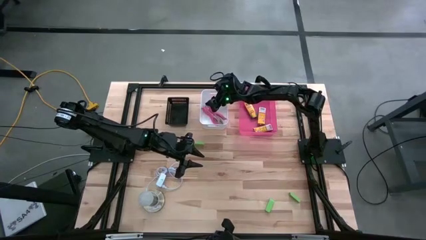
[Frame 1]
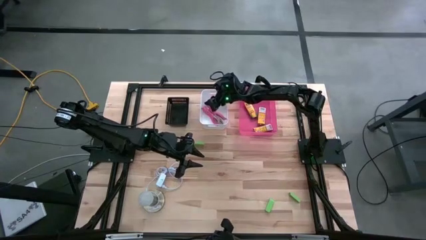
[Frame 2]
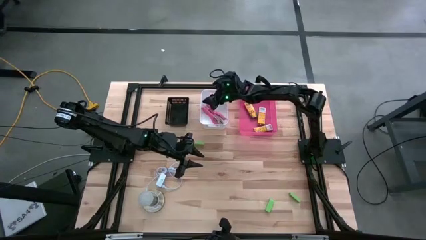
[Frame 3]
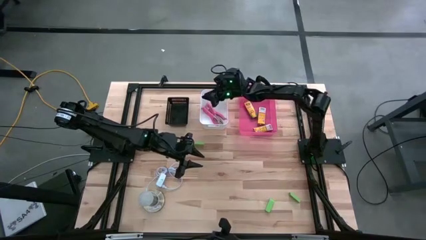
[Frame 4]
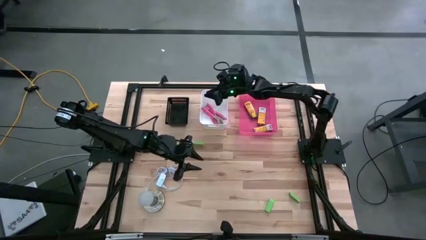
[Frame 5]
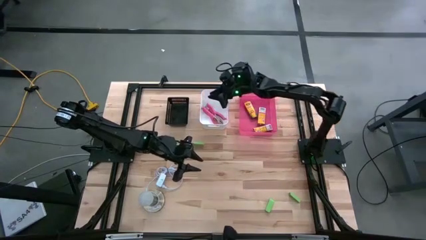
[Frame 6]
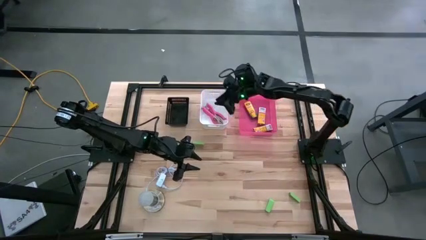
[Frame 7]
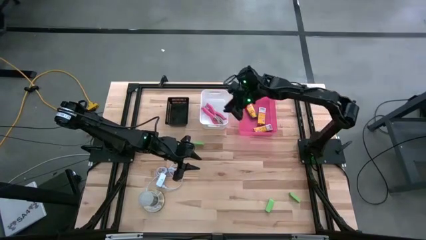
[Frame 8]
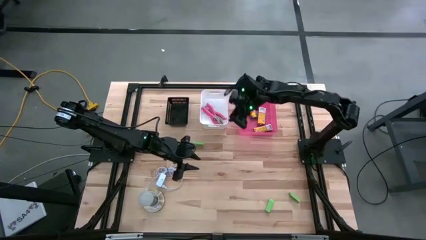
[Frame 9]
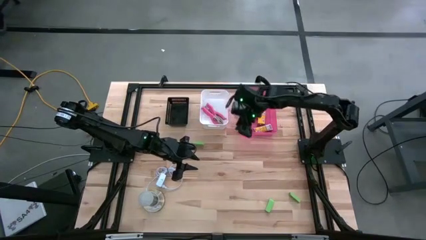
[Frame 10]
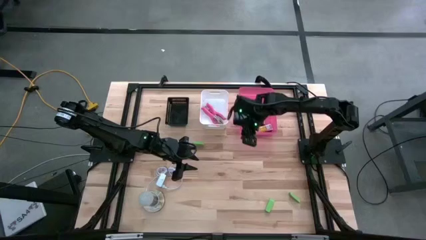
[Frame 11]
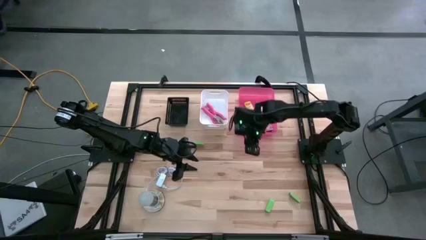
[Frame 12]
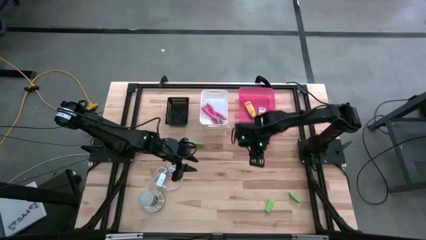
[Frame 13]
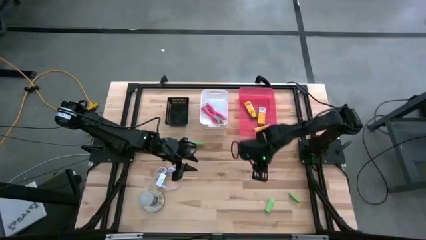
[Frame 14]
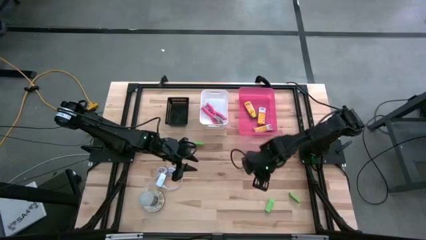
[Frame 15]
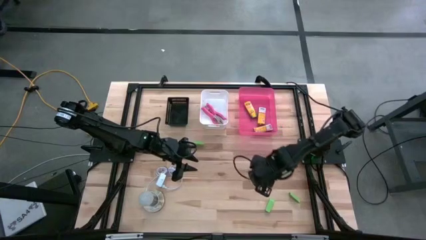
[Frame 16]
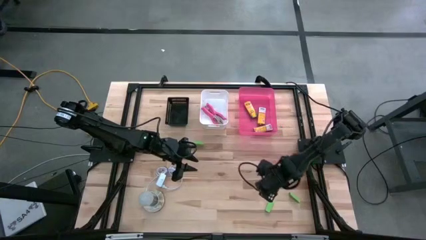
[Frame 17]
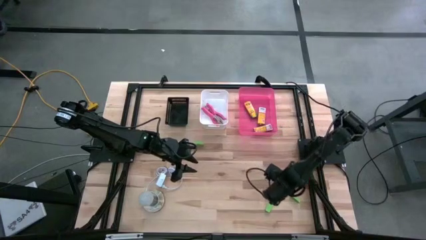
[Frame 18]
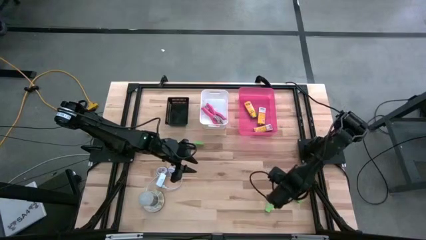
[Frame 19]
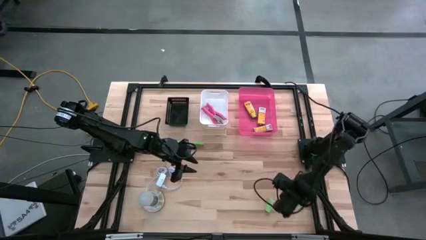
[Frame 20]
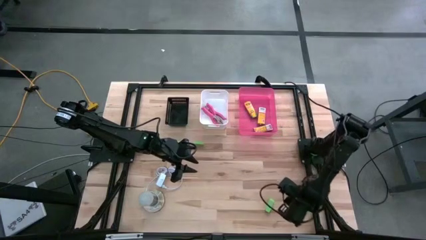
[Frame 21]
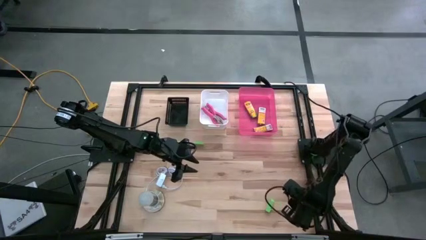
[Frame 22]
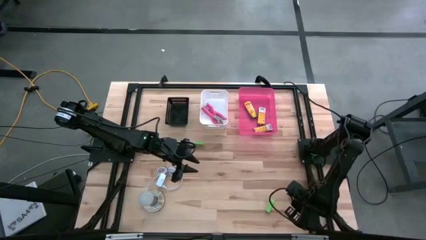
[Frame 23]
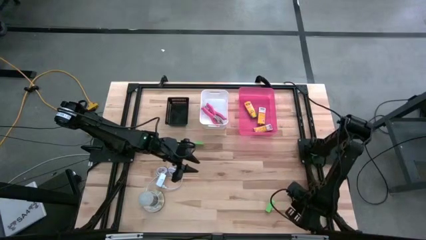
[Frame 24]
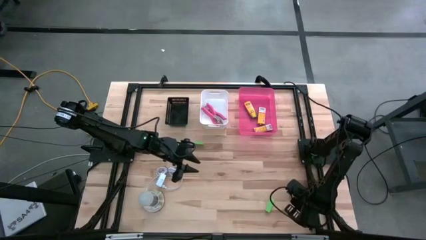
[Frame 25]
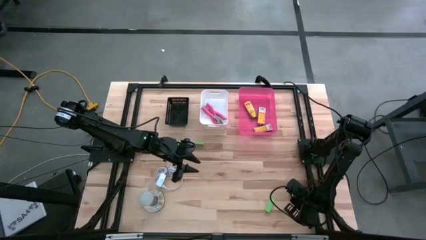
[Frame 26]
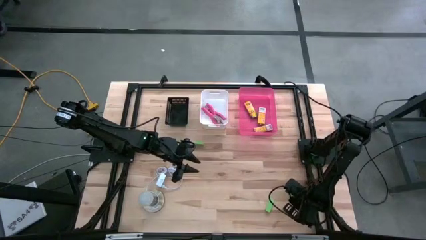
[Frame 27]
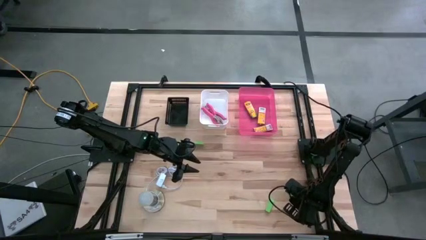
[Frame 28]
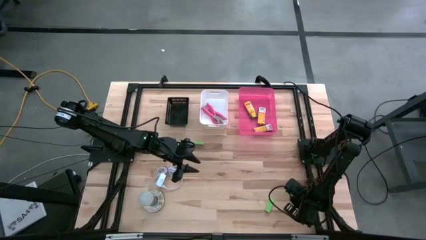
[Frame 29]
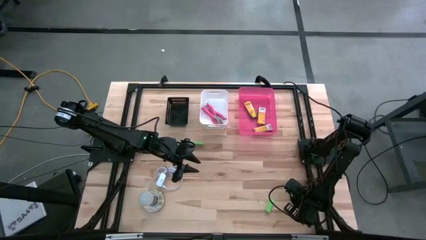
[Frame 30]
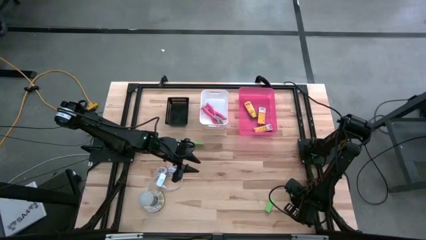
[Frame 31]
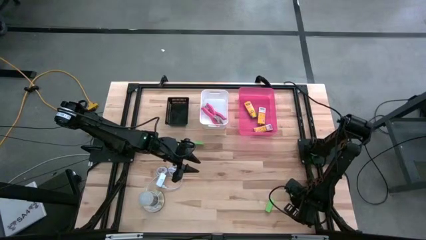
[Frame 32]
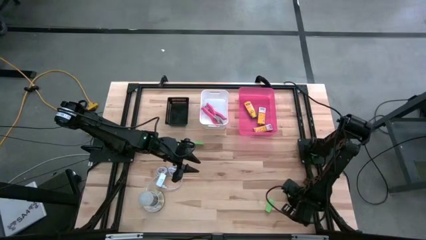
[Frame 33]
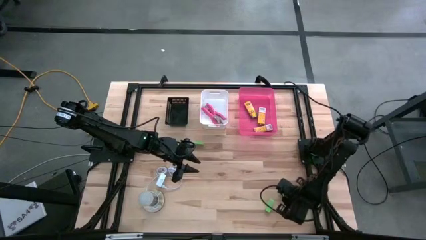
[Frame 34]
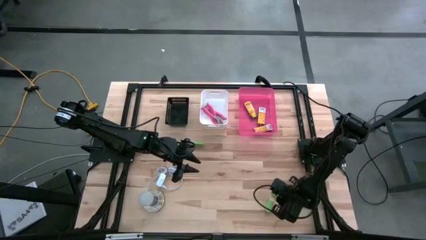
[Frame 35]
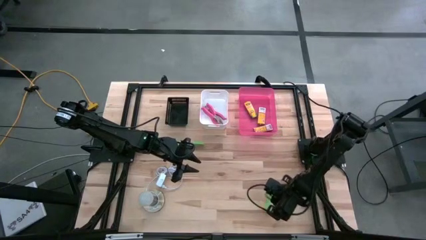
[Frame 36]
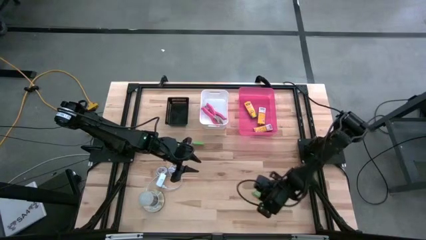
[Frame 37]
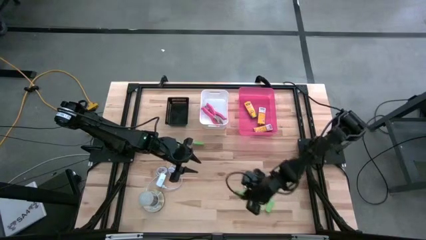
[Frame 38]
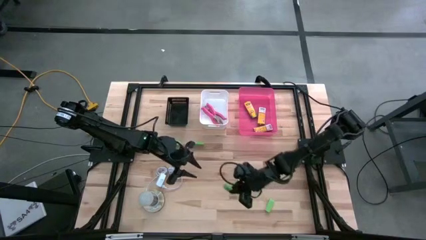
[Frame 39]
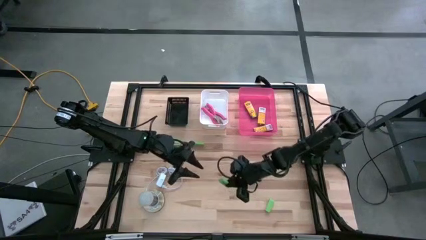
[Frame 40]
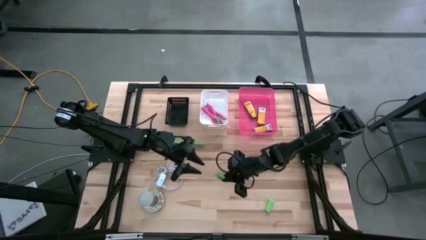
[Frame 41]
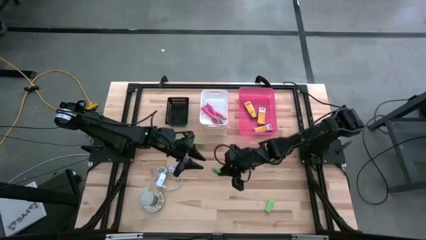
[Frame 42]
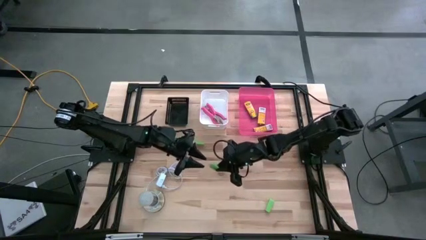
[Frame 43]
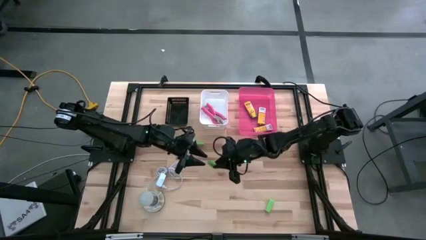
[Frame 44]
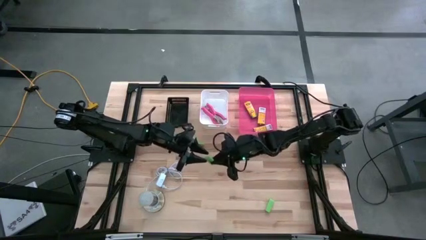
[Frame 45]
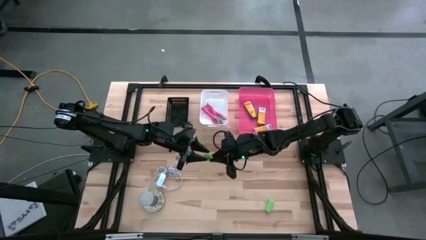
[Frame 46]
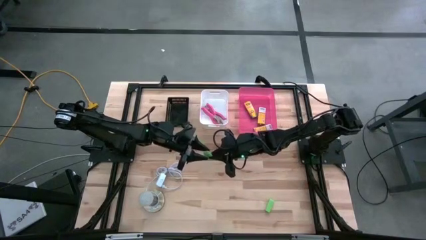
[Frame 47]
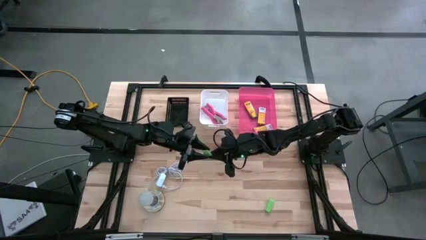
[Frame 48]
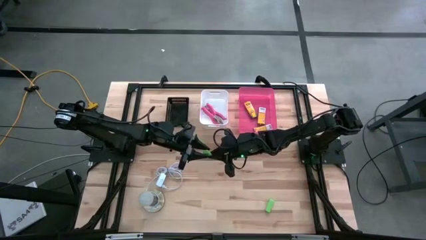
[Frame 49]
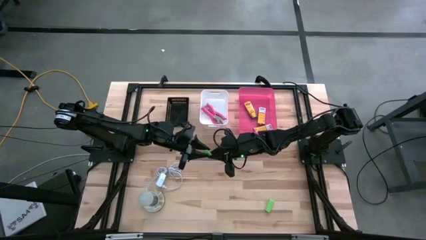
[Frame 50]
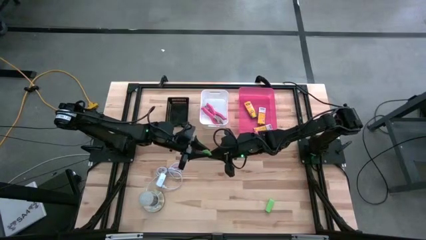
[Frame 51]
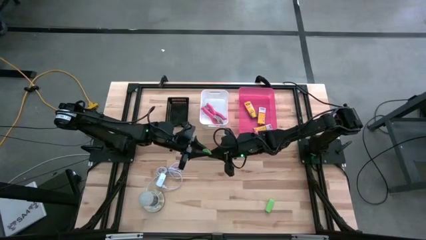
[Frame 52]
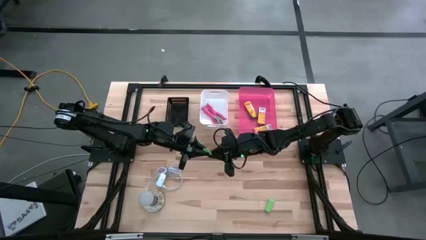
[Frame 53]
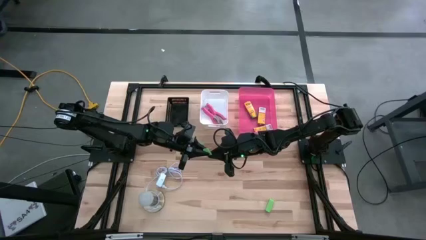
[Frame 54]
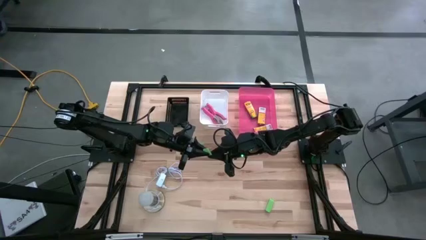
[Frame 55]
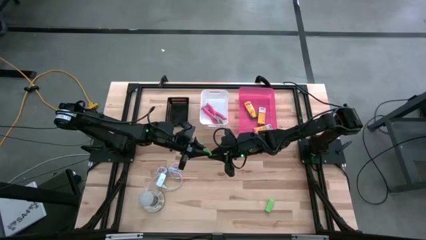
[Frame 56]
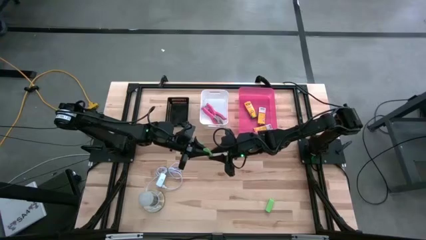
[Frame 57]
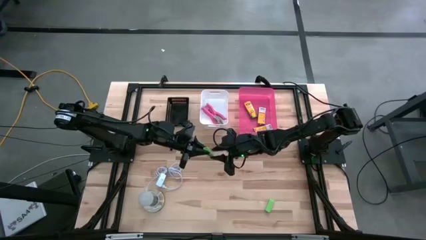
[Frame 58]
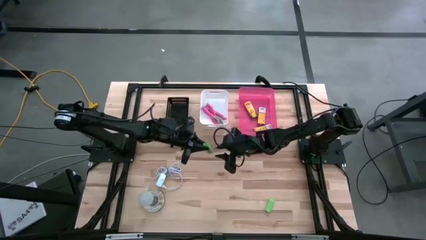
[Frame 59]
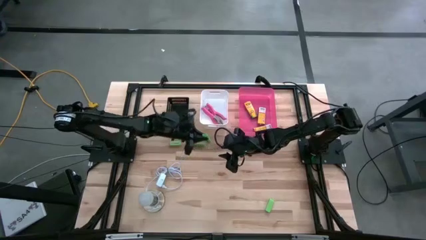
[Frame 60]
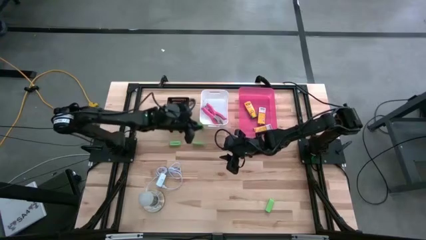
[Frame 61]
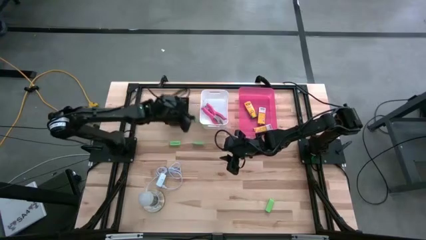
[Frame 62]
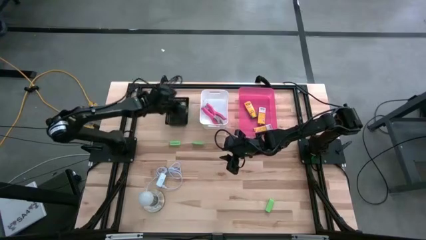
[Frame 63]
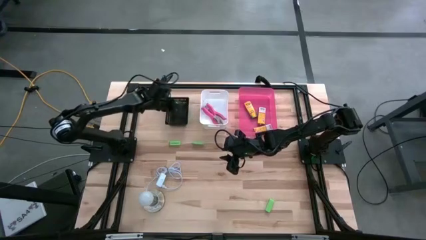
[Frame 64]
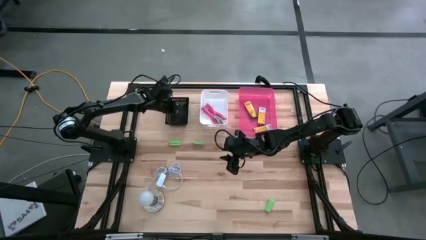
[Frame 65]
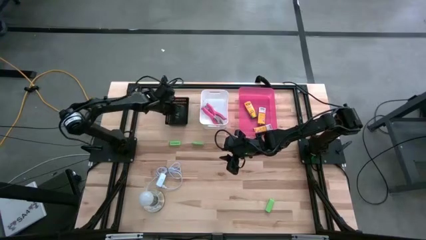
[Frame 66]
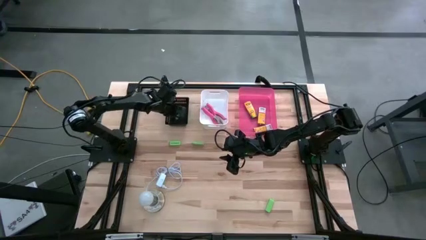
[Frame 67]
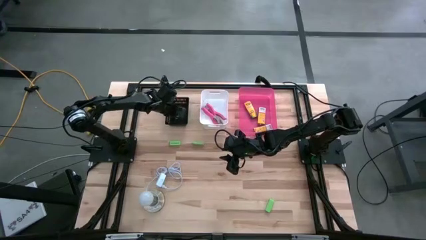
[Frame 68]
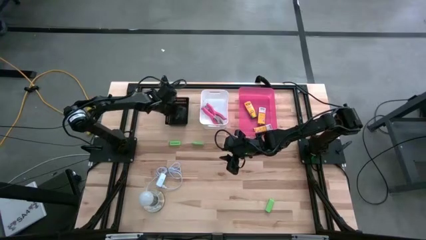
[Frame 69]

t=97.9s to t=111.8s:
Task: Pick & Place School Supplies
Put the eraser into the black bin
